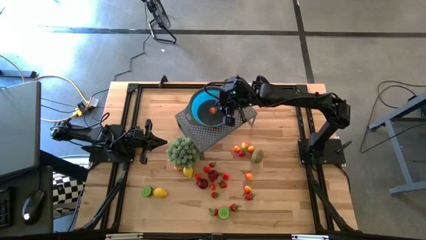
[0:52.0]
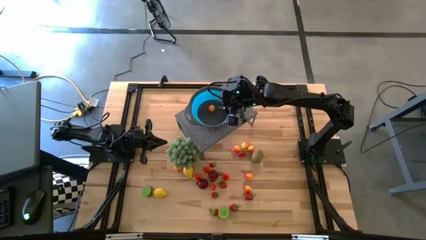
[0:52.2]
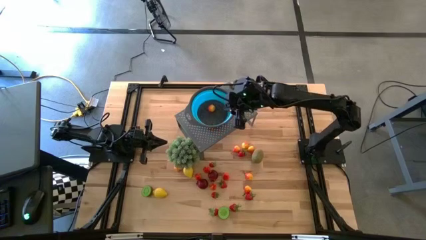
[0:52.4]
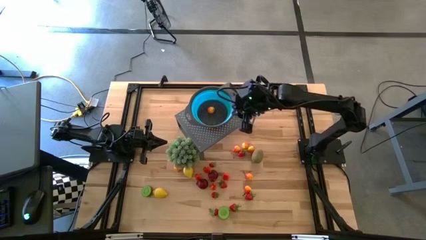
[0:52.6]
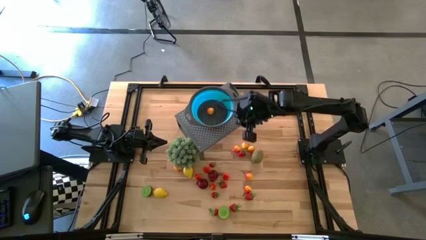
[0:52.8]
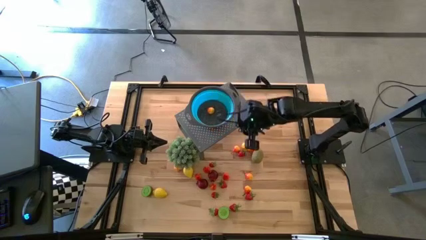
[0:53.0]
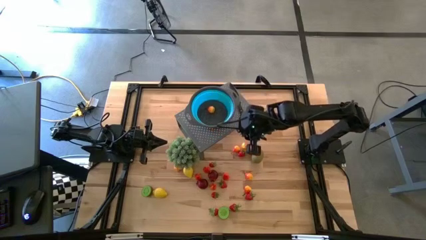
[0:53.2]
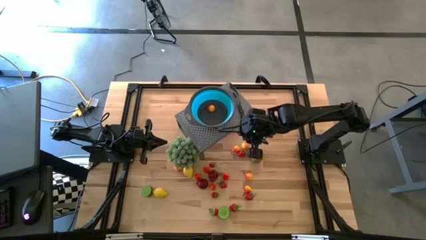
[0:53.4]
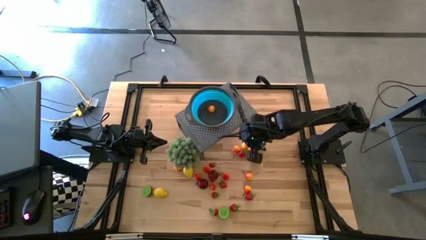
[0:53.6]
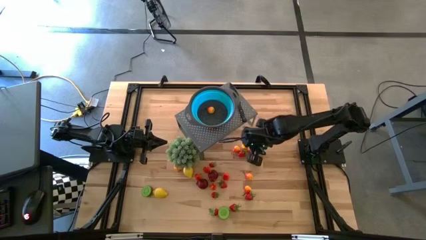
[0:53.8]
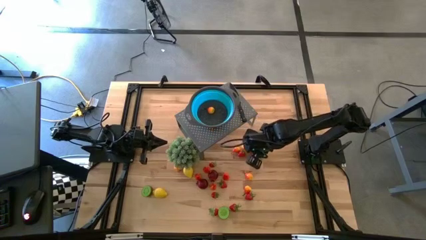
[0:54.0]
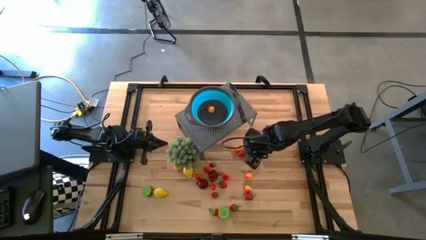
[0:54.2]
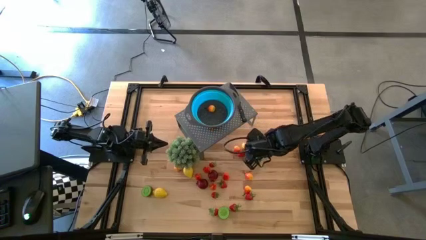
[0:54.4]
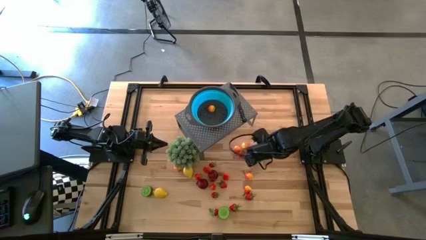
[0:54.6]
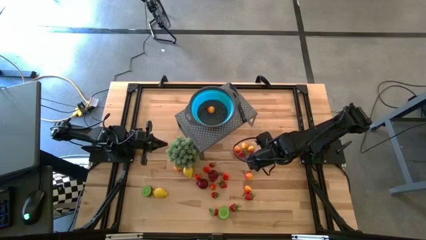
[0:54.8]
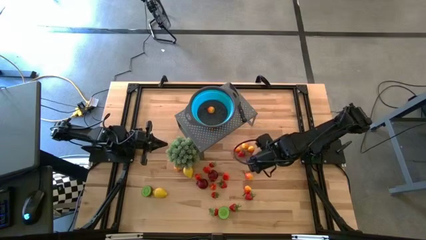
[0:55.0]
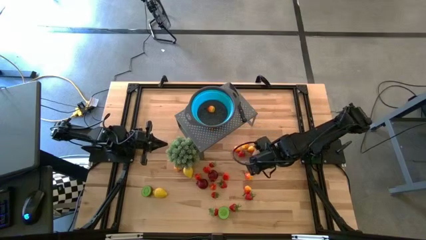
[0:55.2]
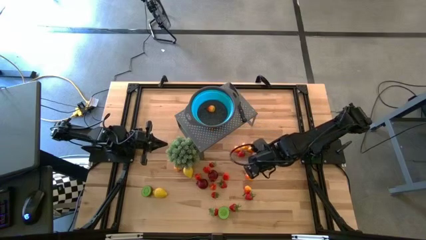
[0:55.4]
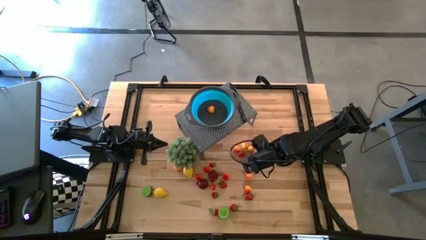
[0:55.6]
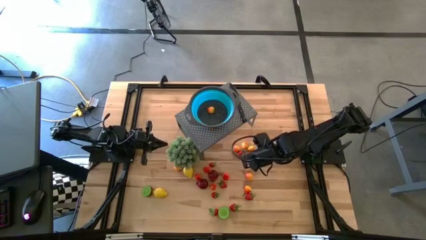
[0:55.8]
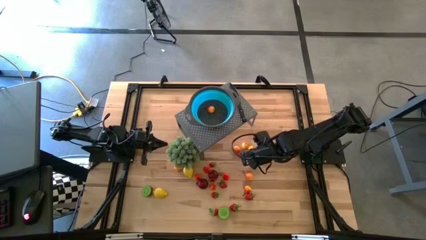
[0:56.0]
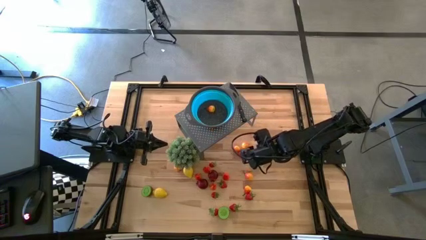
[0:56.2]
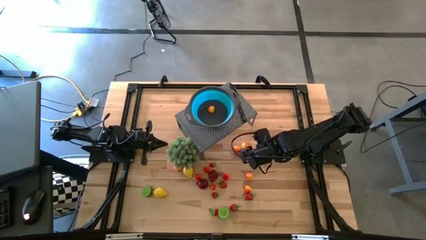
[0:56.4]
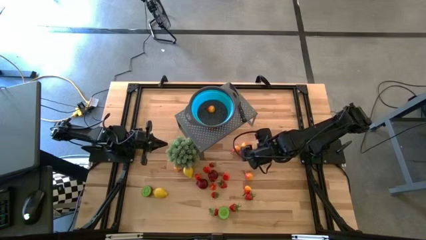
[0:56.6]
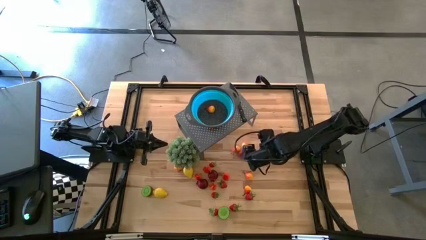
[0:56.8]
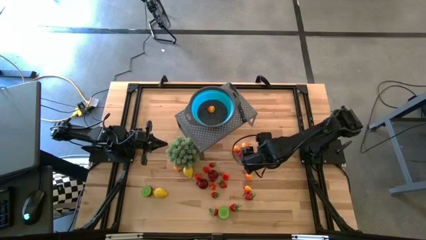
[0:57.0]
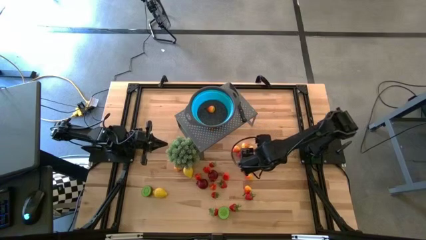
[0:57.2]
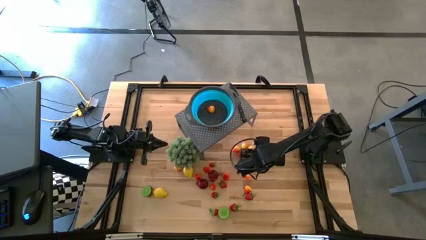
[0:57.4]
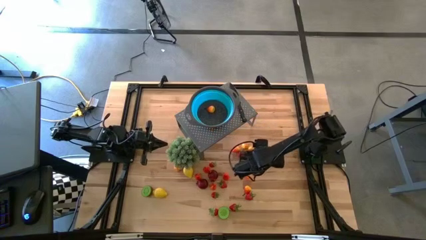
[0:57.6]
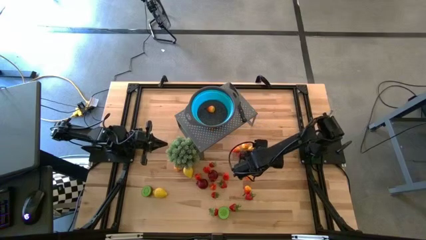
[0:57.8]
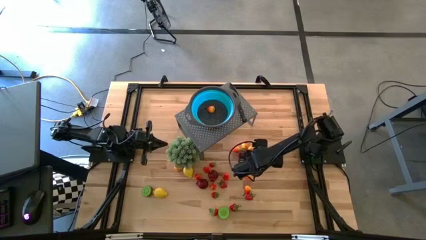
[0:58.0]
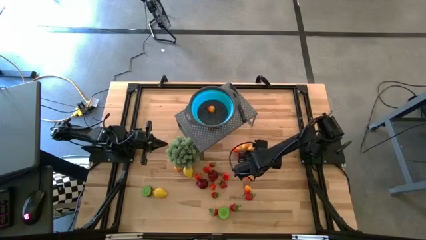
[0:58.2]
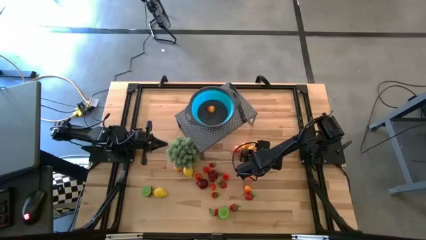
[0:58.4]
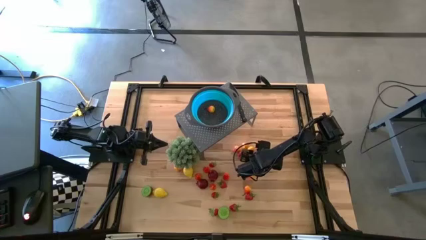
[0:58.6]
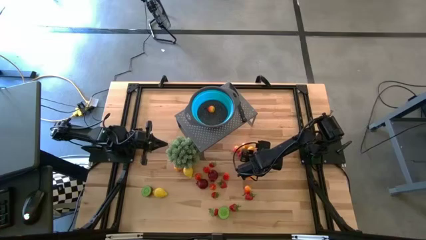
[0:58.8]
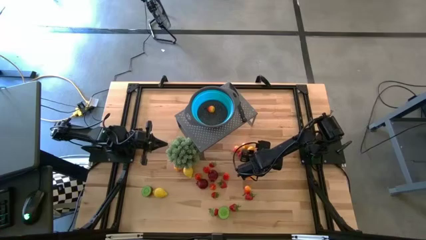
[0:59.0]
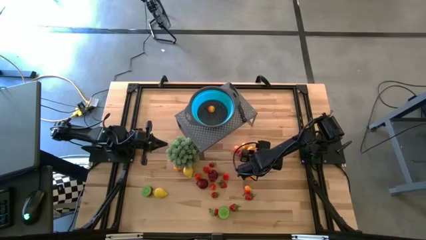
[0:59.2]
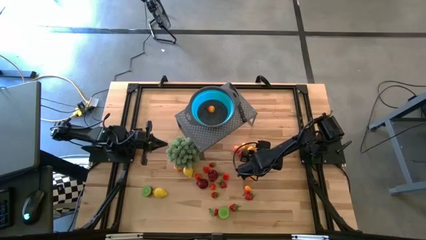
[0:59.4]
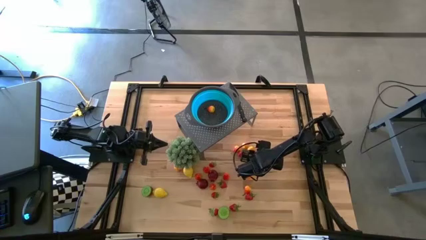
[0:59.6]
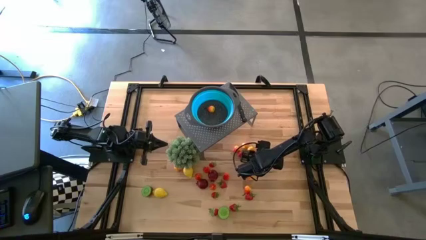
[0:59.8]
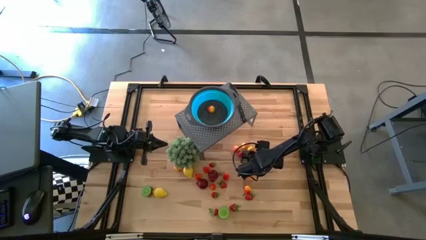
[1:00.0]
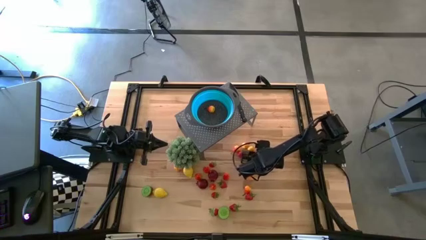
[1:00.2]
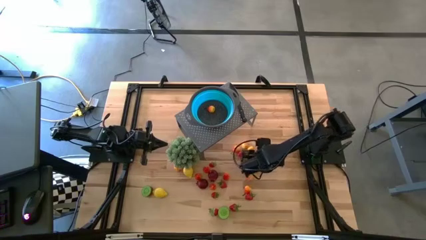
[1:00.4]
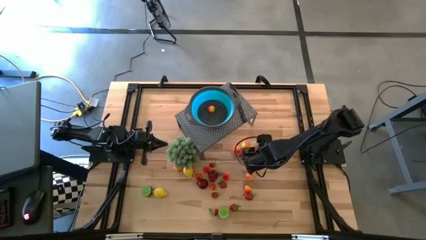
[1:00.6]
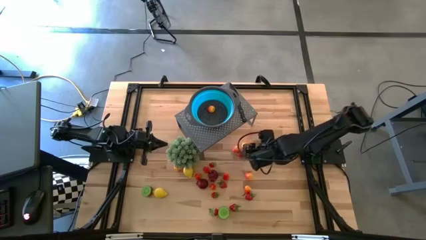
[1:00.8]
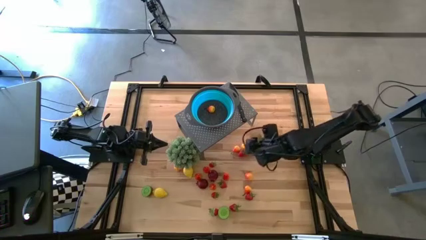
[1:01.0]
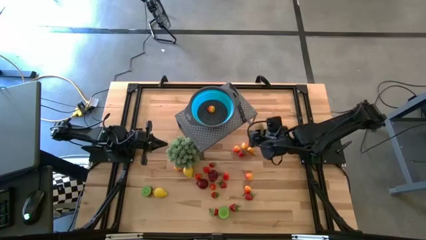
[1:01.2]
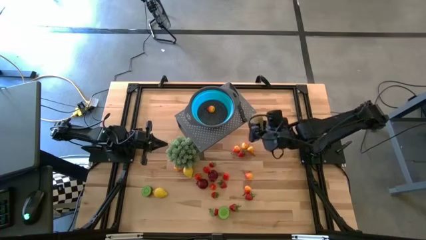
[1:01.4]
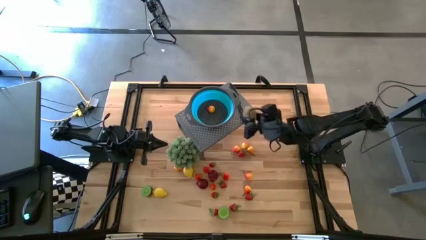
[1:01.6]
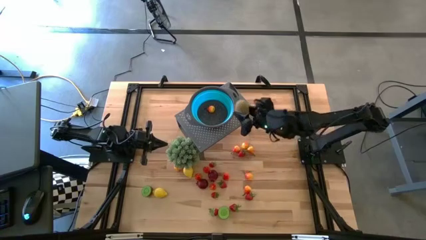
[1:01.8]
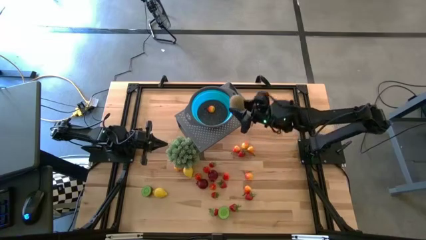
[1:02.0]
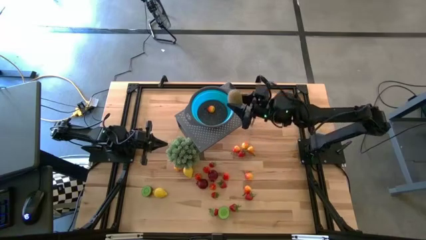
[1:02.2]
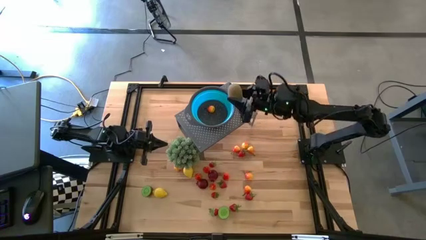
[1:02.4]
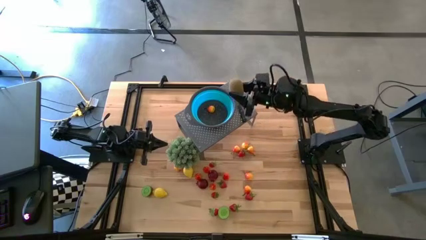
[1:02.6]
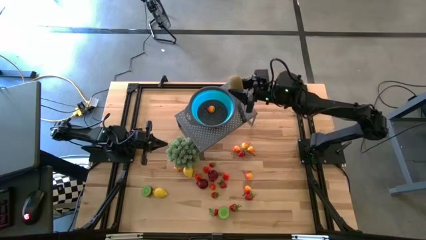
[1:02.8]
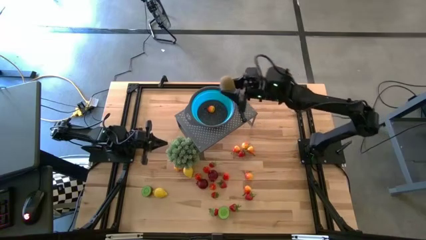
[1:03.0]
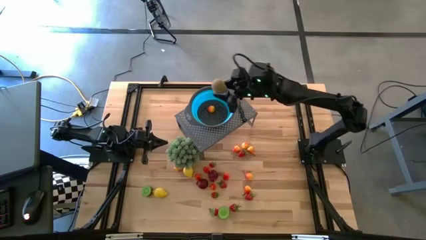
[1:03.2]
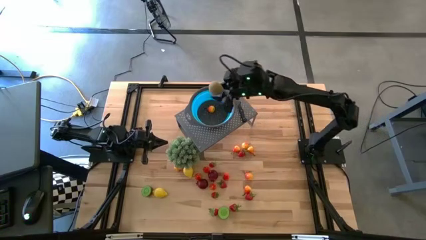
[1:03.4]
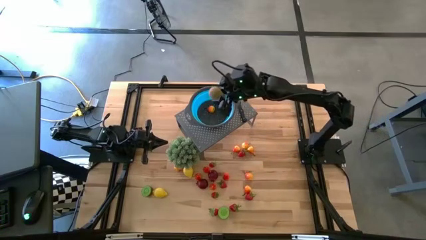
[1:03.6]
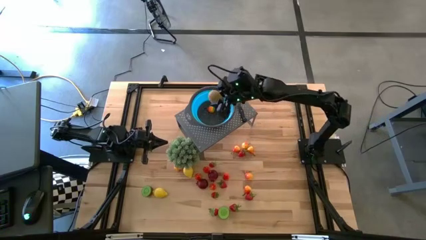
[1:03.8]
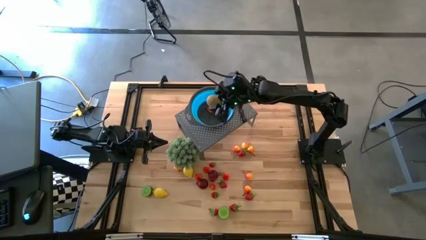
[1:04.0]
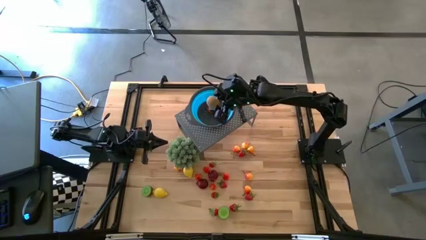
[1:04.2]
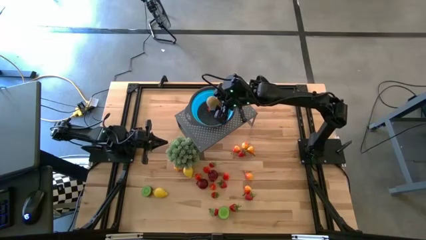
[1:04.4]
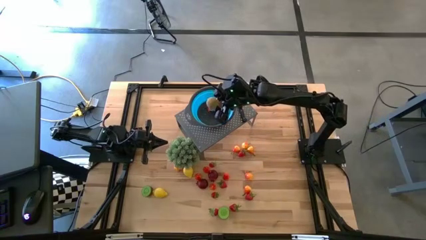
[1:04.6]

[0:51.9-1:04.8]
Task: Pick & Place Fruit
Put the kiwi into the blue strainer bowl on the shelf
